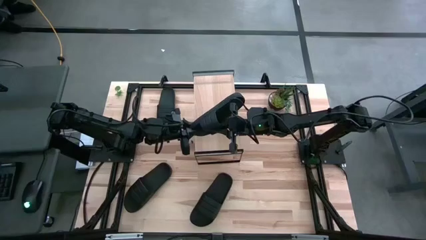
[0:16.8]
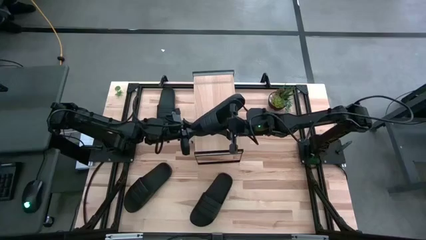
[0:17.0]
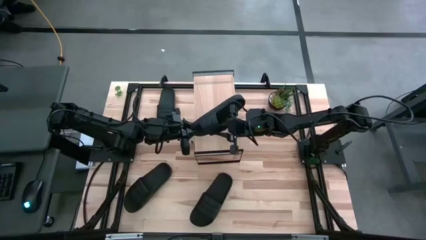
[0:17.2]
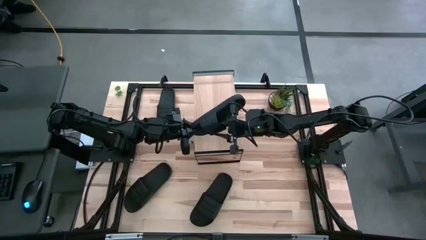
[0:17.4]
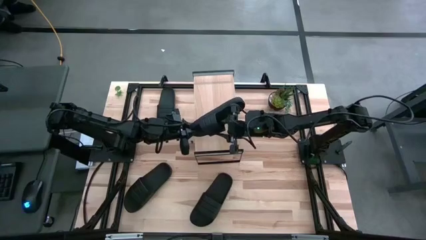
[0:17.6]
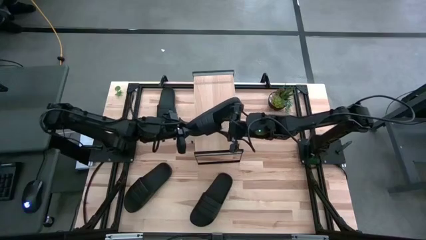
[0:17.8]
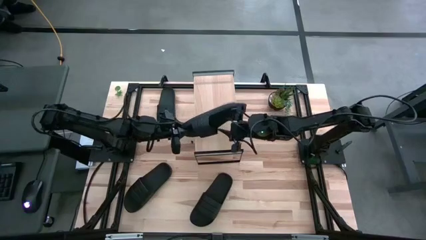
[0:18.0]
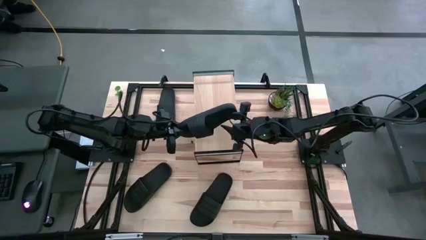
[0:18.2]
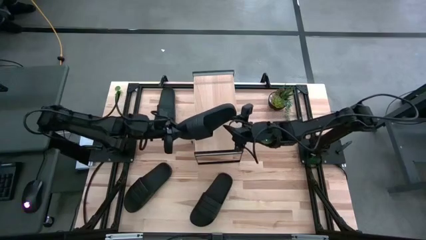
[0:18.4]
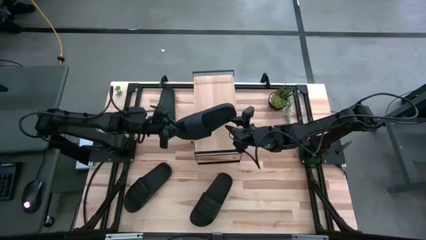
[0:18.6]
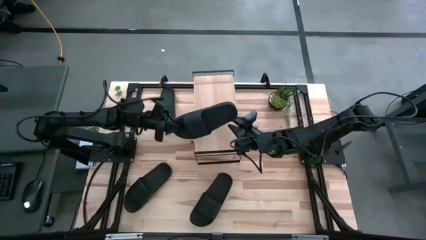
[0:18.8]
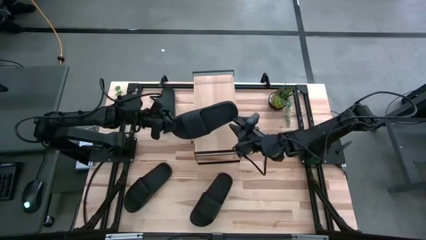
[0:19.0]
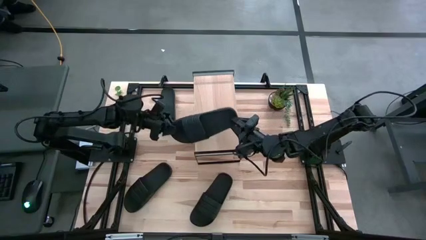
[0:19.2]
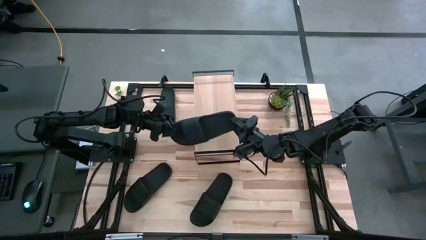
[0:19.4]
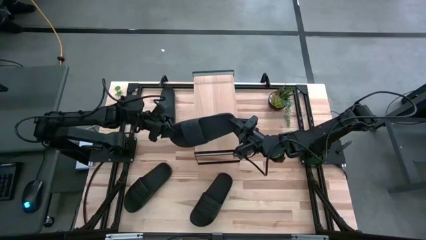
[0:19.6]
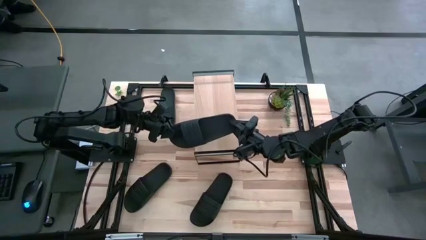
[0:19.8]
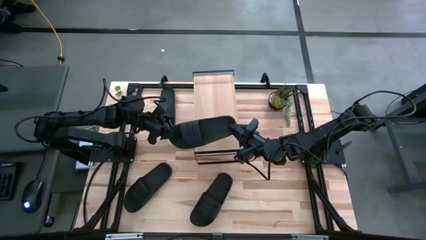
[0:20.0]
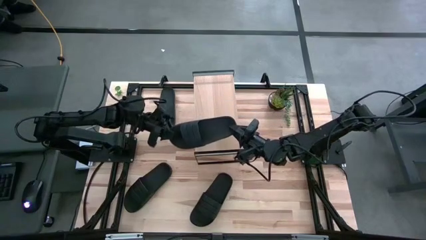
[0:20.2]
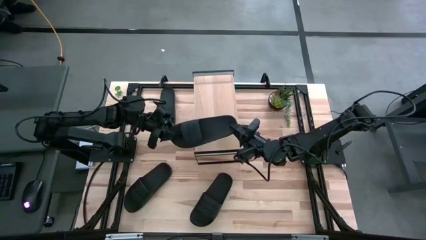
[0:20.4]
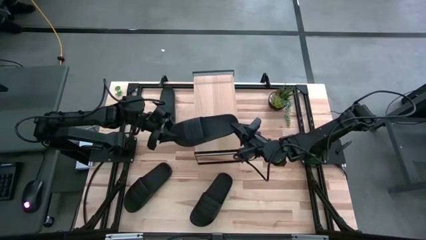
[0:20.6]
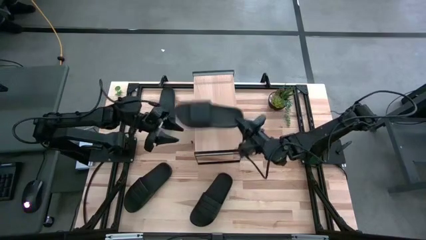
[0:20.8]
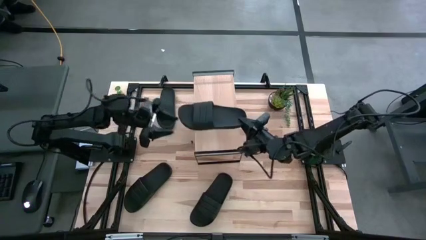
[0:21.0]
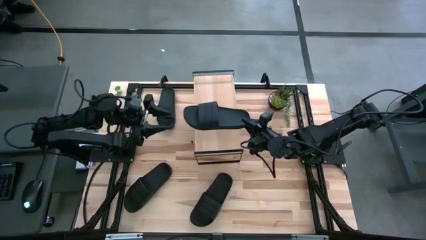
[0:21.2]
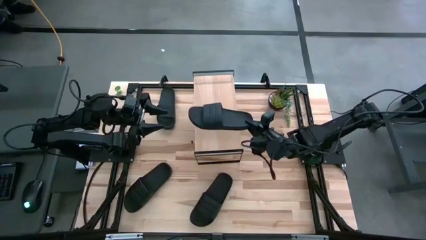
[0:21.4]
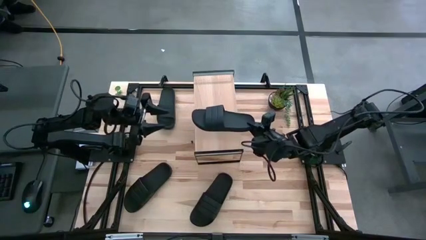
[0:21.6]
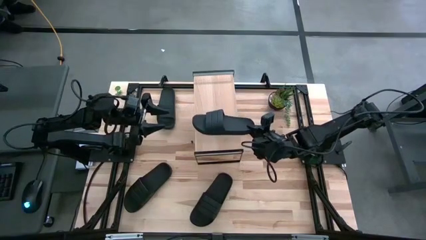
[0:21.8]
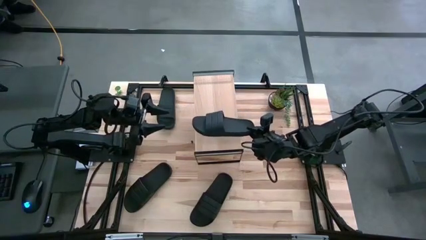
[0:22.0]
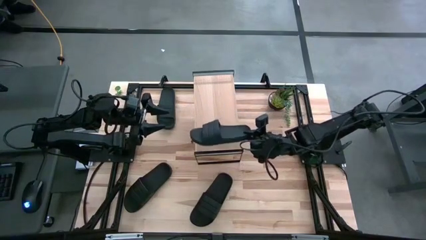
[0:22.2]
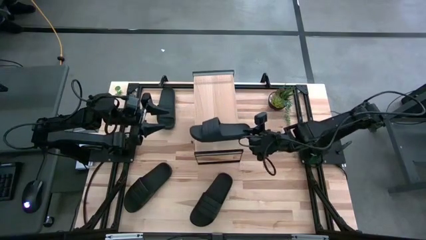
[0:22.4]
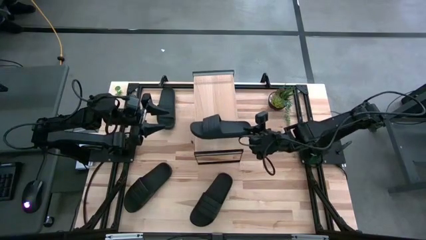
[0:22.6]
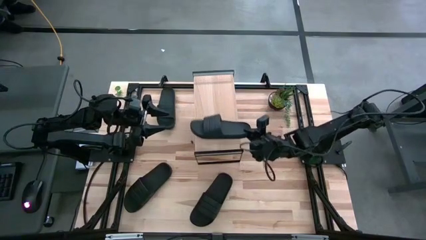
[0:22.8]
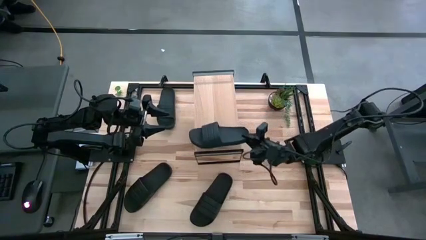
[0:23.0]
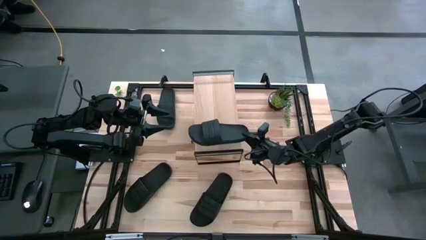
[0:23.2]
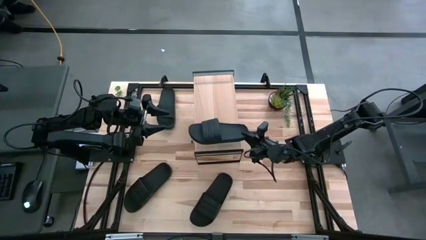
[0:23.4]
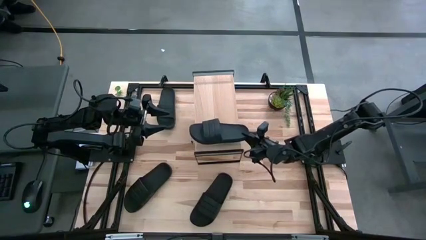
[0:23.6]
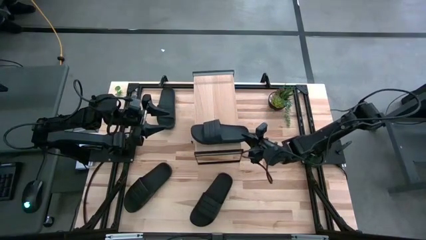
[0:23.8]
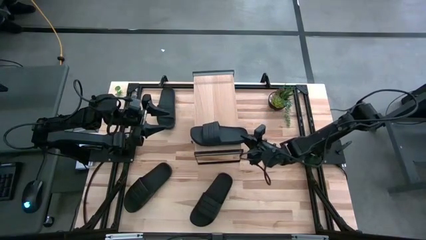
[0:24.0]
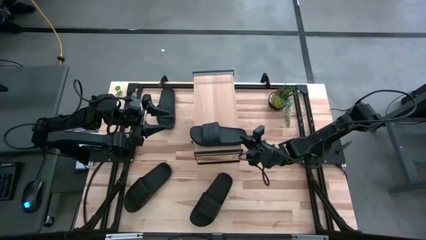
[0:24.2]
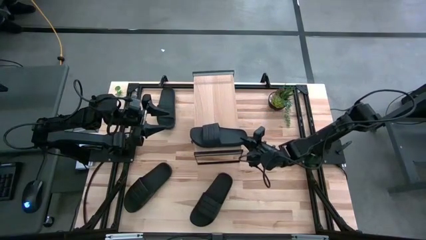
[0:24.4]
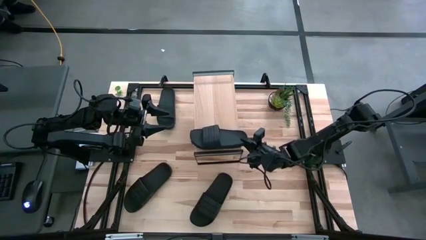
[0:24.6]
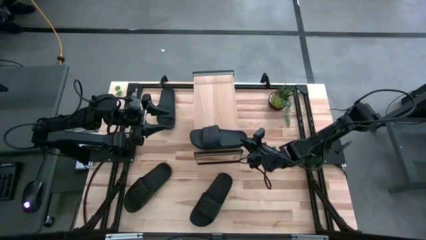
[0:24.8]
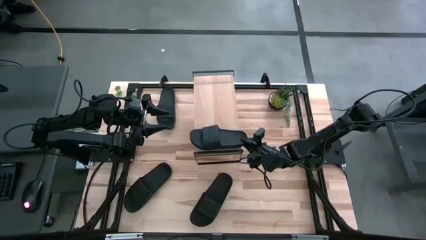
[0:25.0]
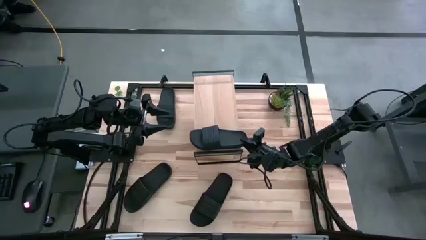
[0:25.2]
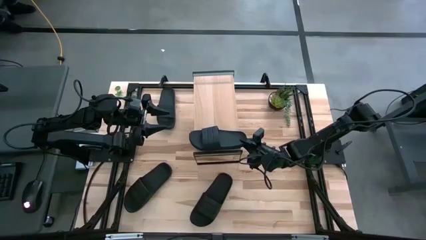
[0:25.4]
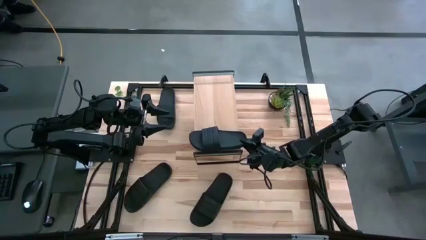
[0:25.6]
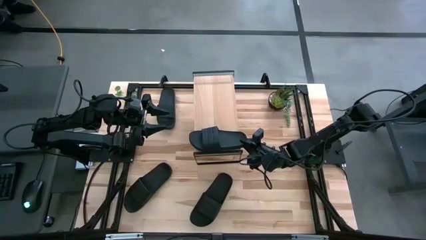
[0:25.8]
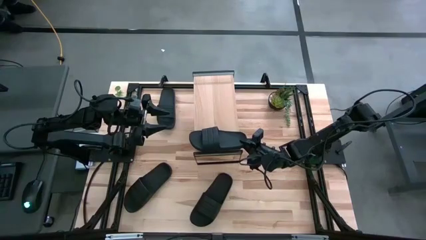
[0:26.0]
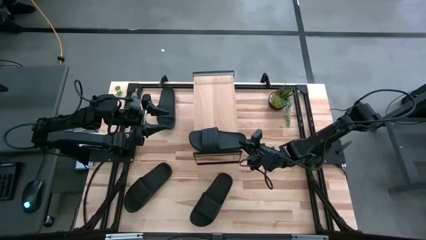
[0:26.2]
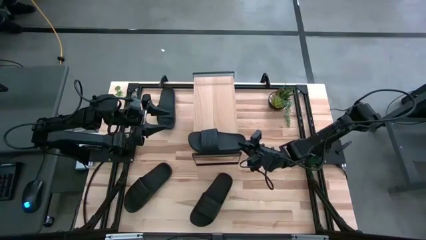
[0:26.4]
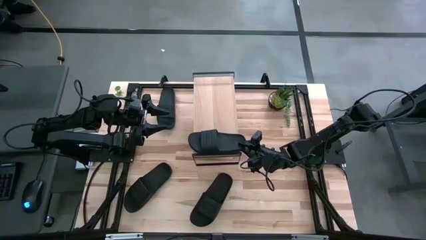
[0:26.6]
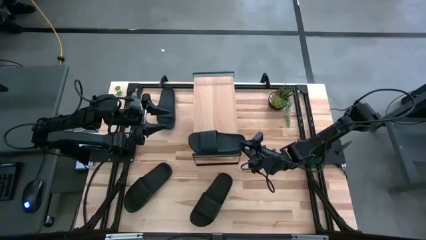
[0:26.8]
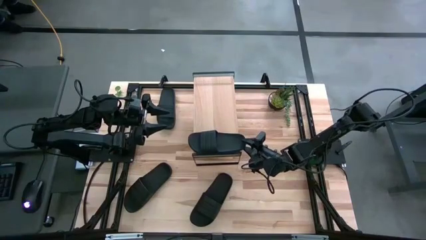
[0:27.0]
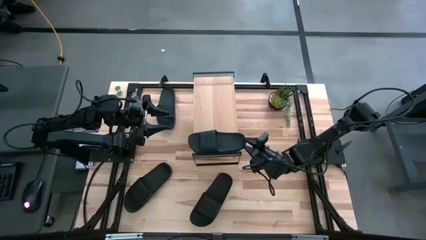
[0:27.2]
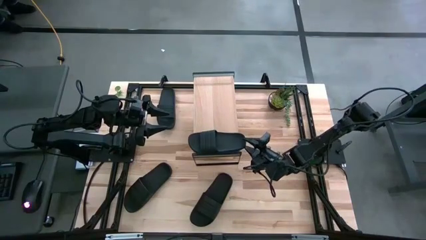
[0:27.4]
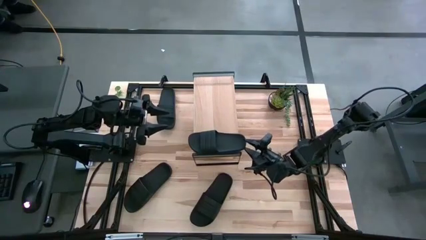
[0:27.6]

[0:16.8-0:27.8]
Task: Pick and place slides into the shelf
Put the bottom right slipper on the shelf
